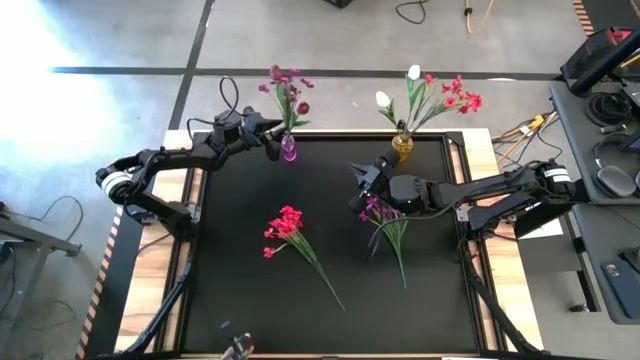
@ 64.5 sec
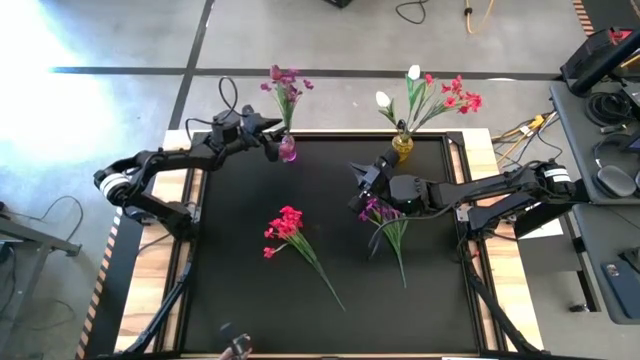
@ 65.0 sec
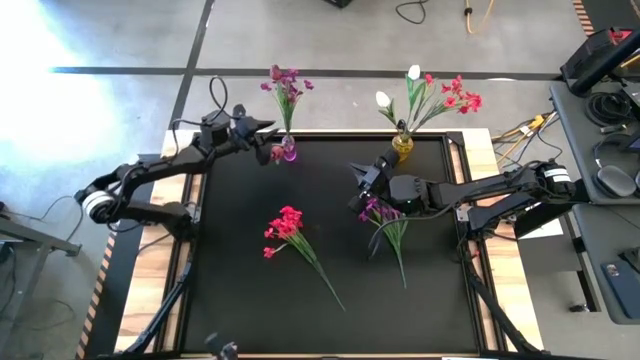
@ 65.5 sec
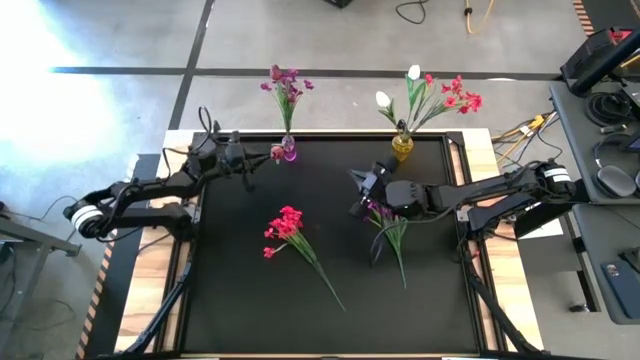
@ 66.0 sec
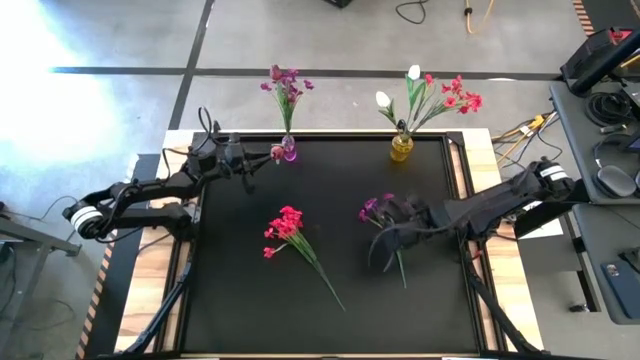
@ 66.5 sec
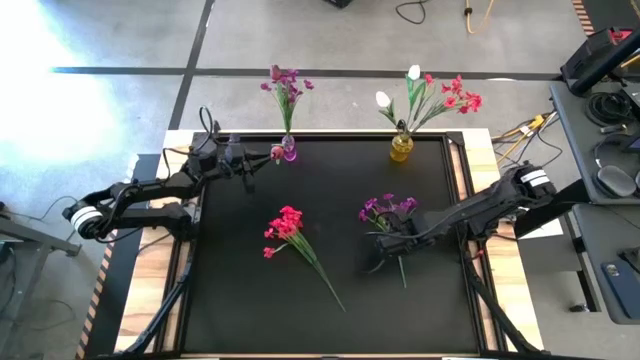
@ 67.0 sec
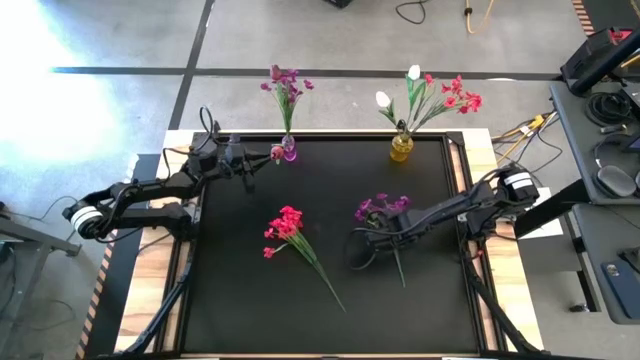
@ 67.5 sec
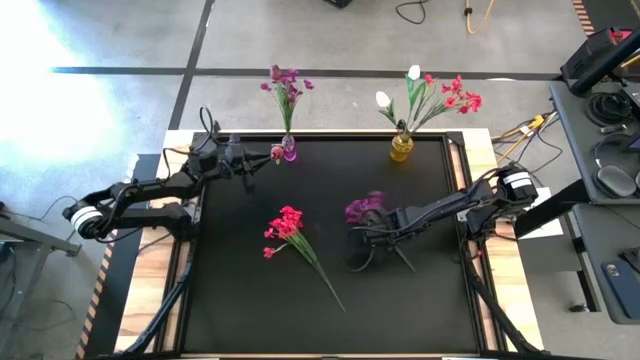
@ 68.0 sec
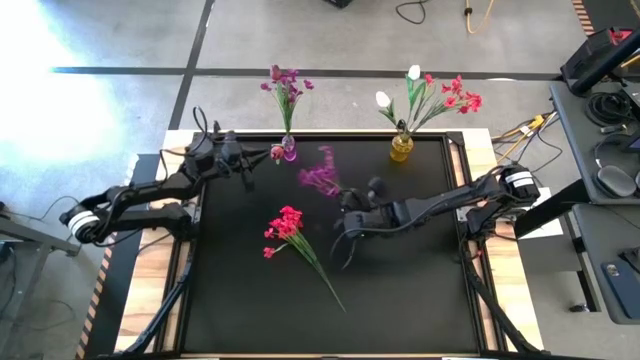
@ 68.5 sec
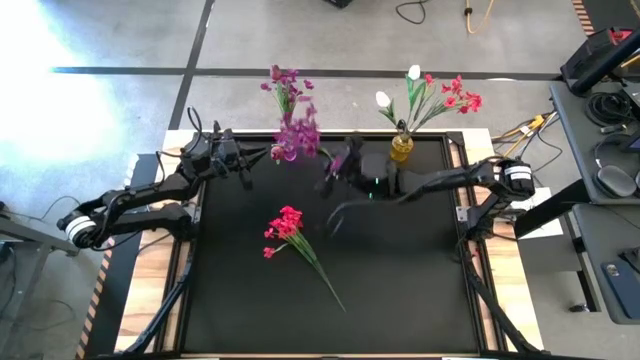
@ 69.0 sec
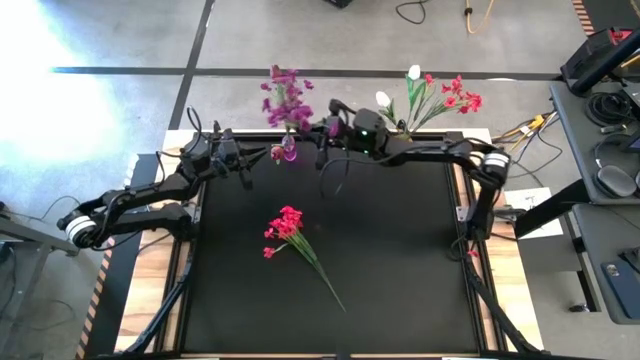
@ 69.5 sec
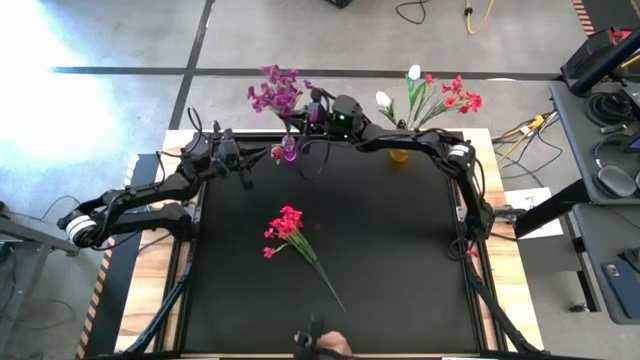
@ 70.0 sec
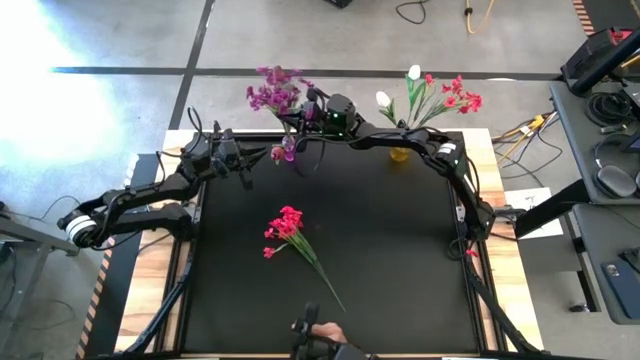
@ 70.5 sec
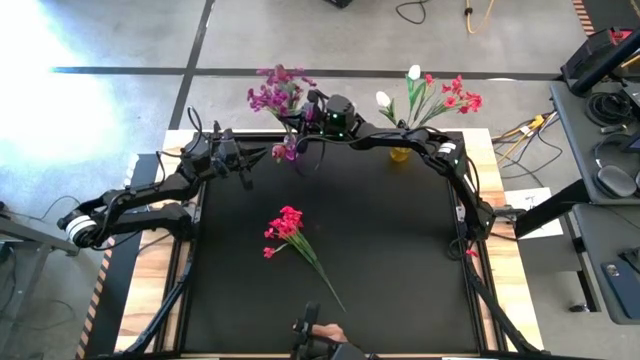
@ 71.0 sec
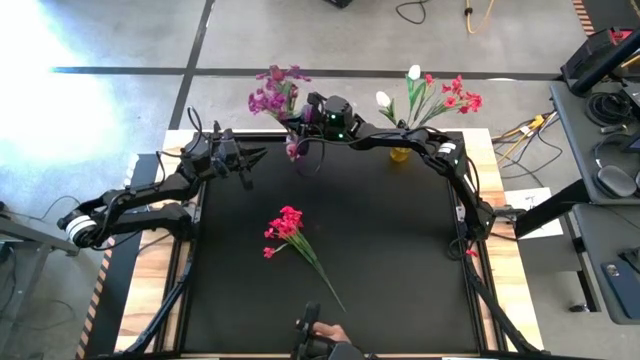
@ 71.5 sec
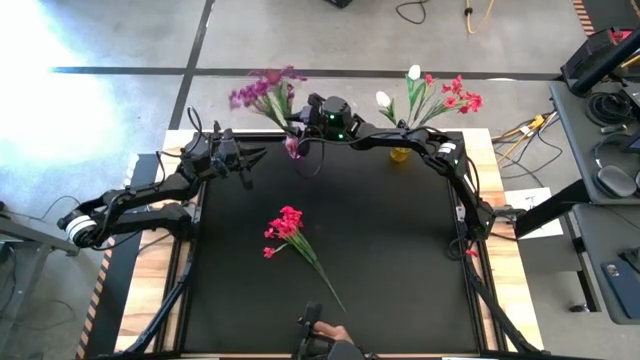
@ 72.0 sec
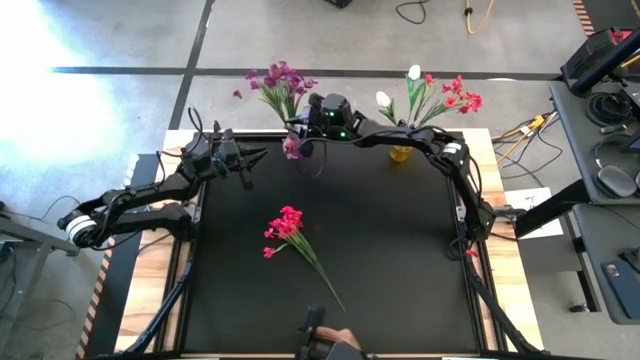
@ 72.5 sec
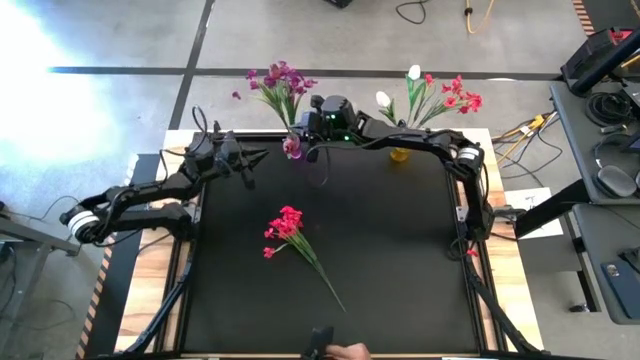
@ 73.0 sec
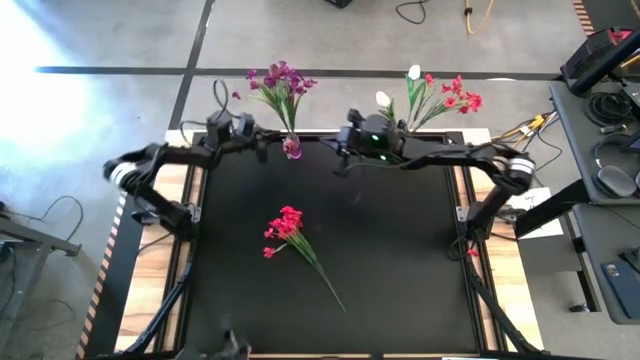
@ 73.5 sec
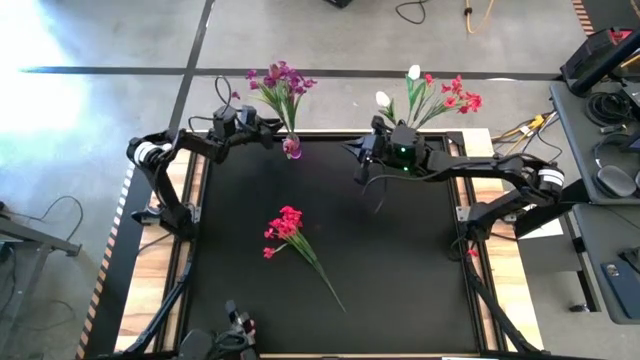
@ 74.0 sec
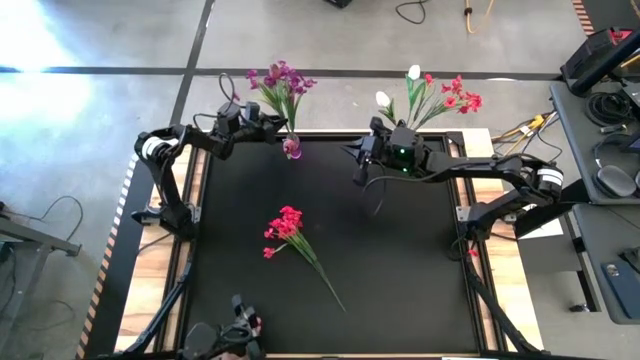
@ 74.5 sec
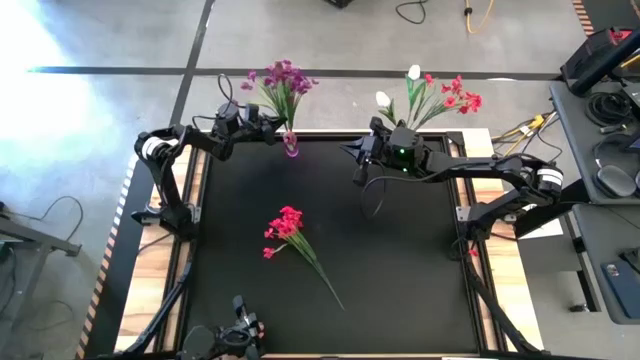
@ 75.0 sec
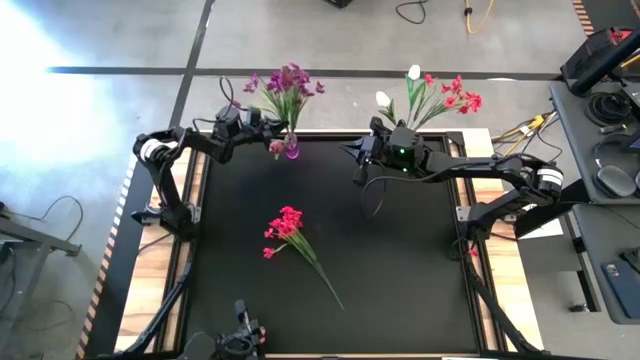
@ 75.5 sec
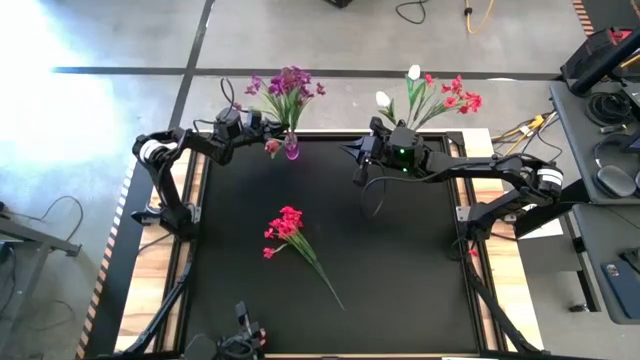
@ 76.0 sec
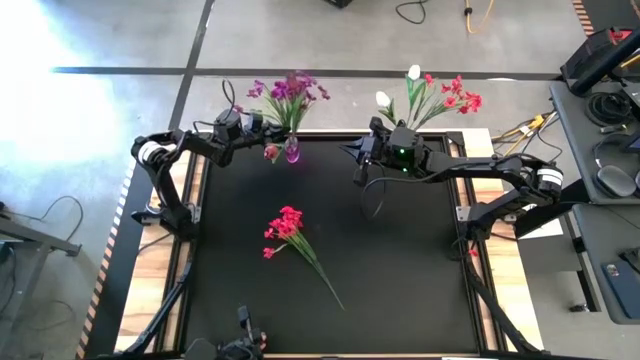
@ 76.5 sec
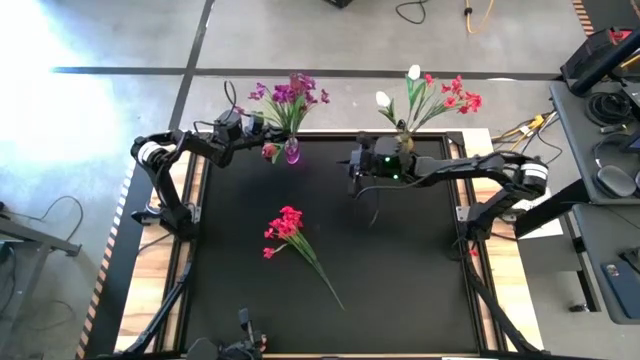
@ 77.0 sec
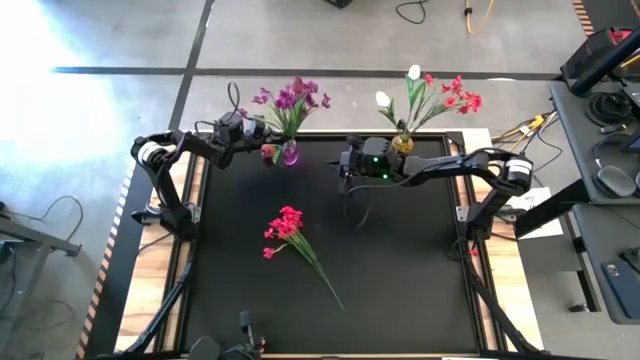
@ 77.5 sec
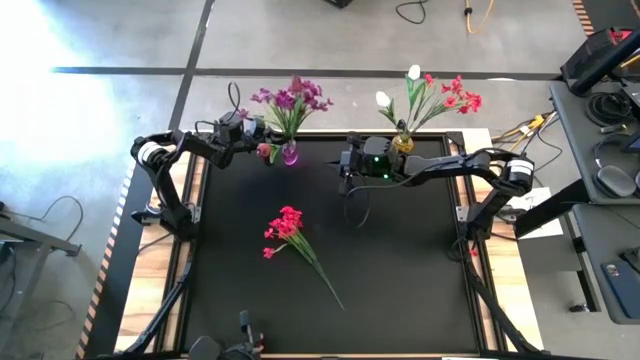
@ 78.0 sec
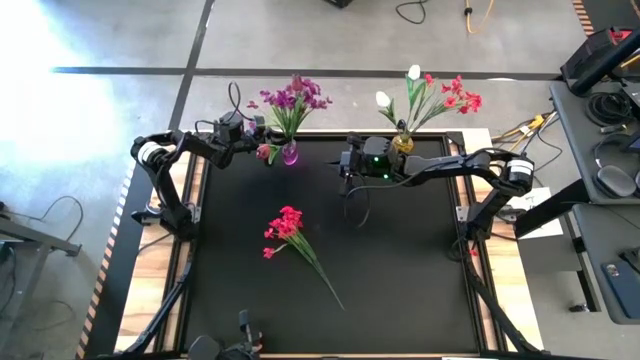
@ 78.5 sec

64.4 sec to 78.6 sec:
Task: Sort flowers into vase by color
Put the bouquet of purple flowers into the purple vase

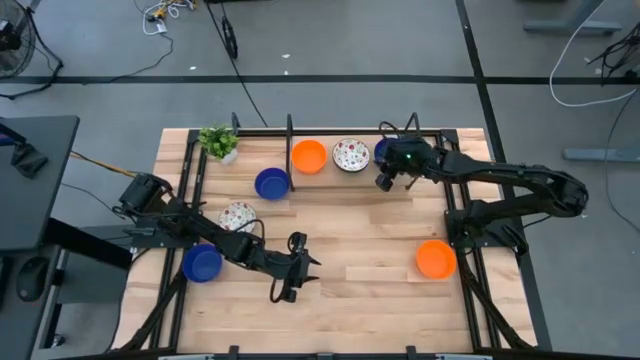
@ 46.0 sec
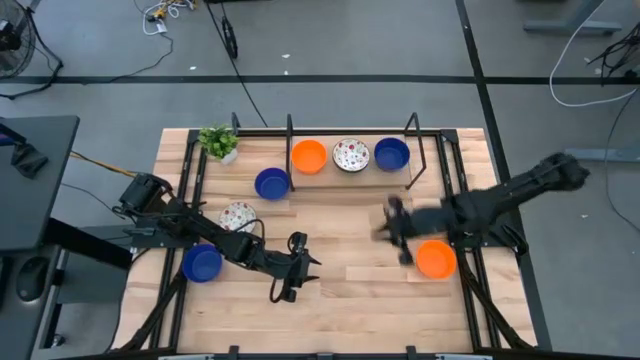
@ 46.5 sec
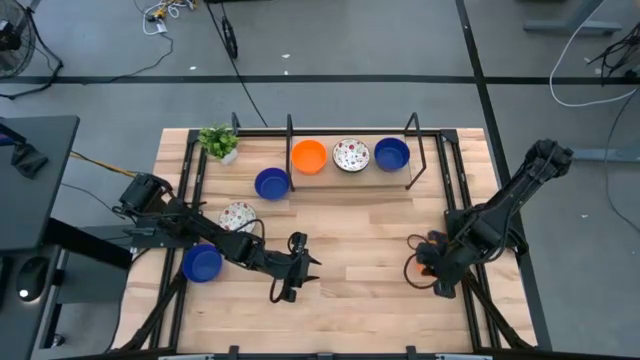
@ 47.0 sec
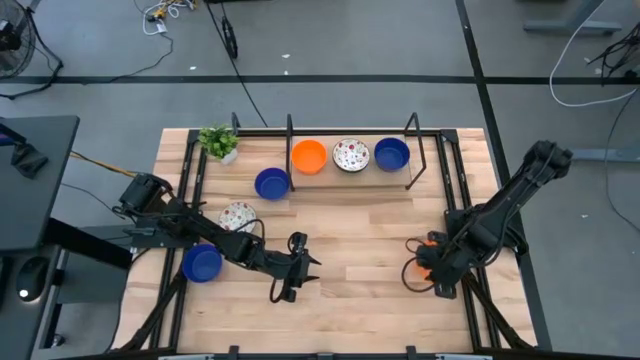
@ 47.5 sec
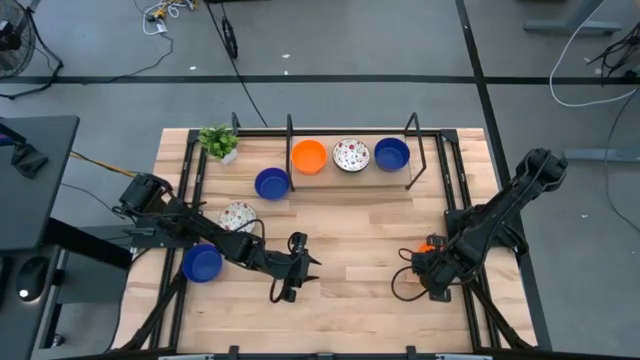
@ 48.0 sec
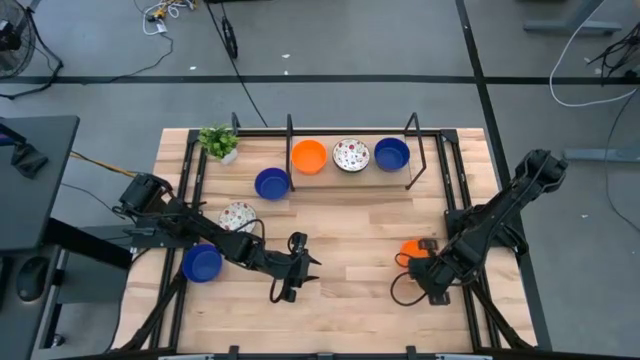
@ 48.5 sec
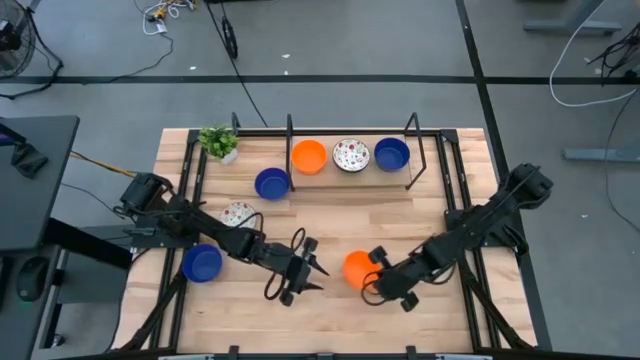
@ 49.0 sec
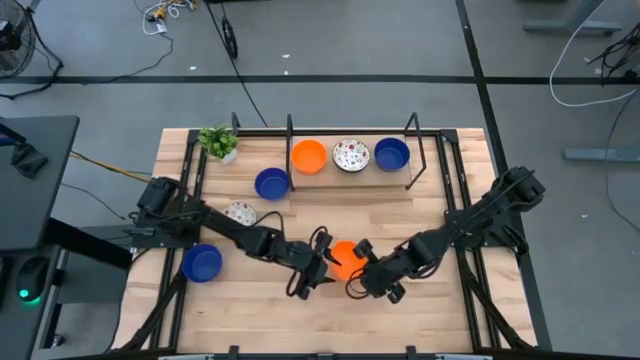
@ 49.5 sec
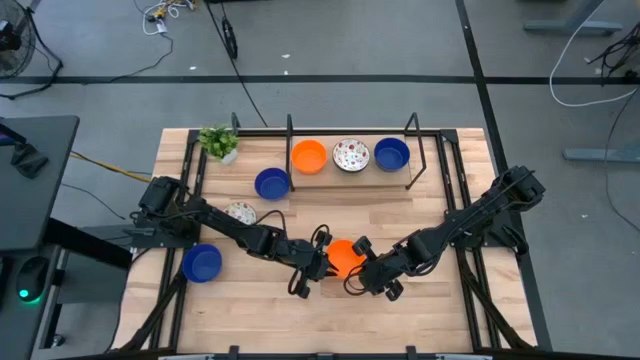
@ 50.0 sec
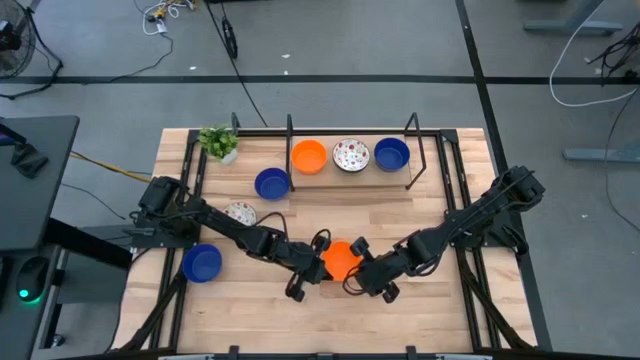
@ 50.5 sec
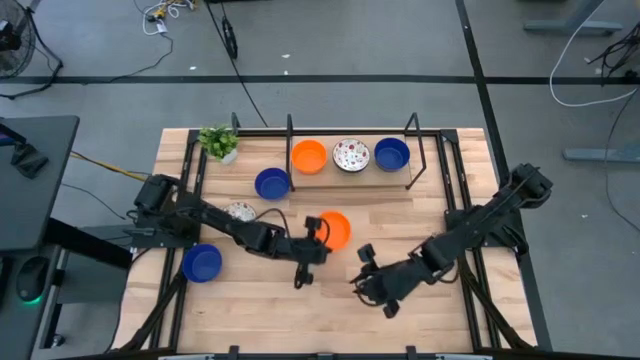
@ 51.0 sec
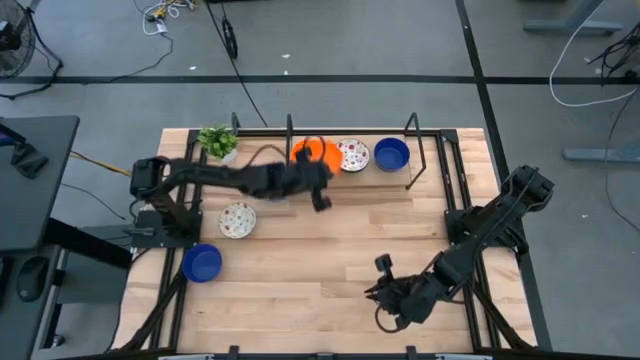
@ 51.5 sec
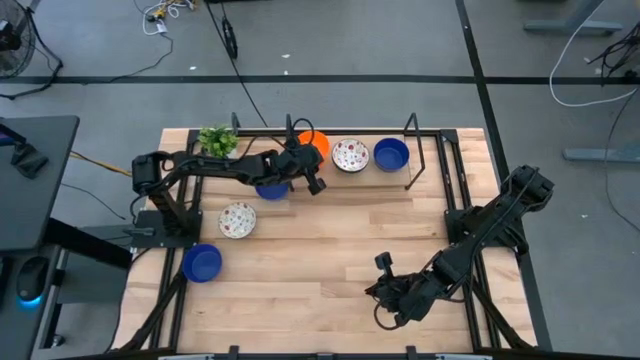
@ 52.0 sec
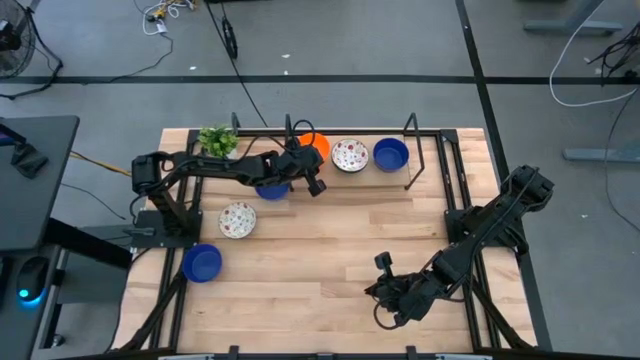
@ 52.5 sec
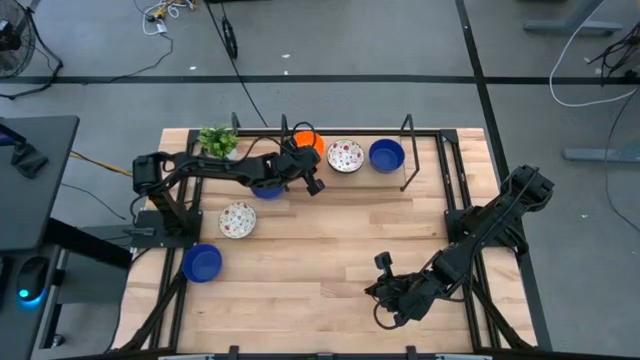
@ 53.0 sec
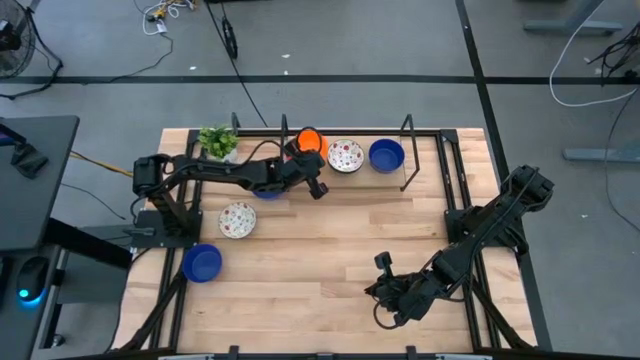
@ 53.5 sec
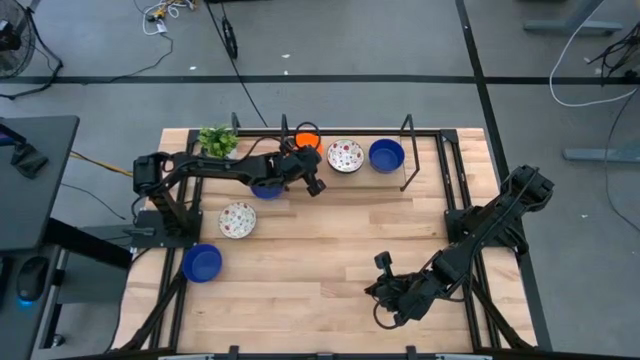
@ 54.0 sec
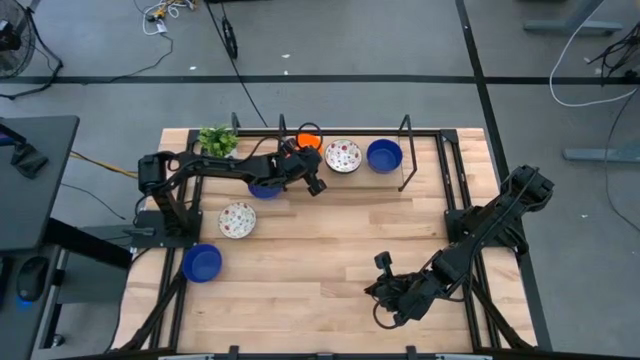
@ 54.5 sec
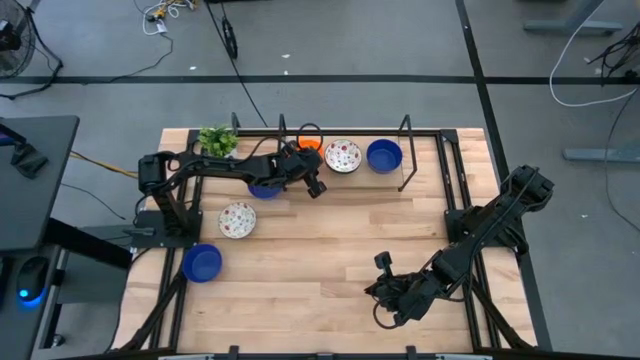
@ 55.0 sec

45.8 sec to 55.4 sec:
Task: Pick & Place Mini bowls
Stack the orange bowl on top of the orange bowl on the shelf
